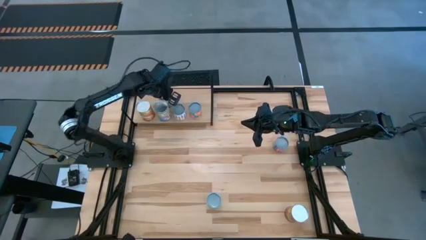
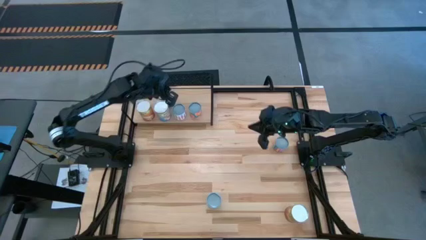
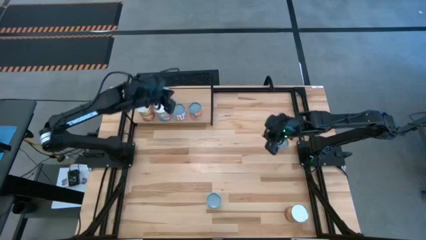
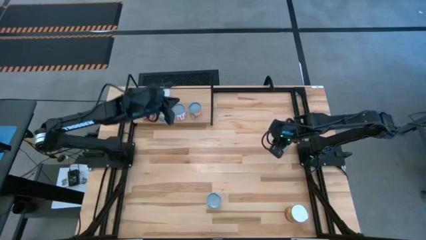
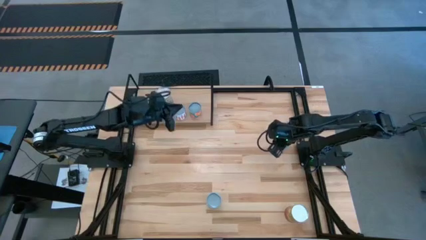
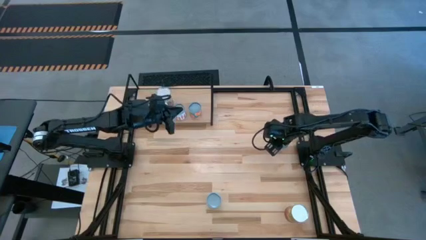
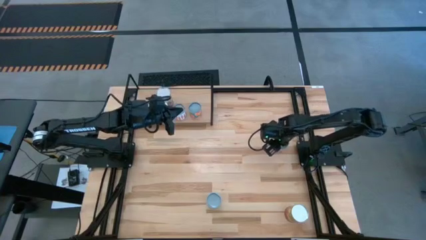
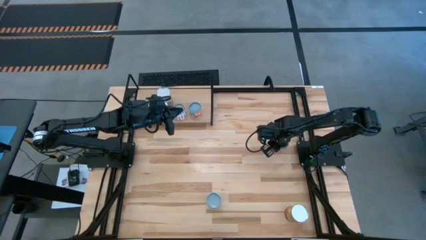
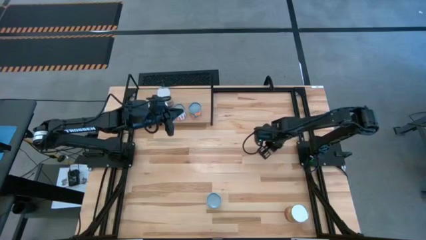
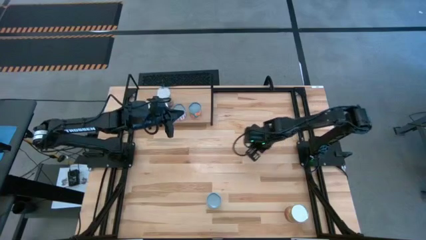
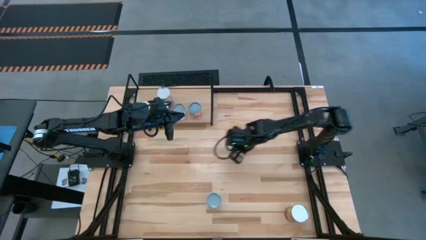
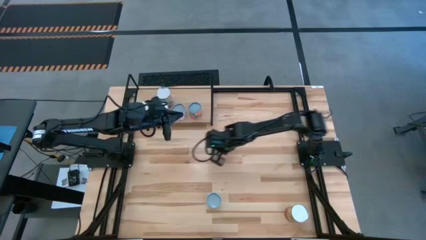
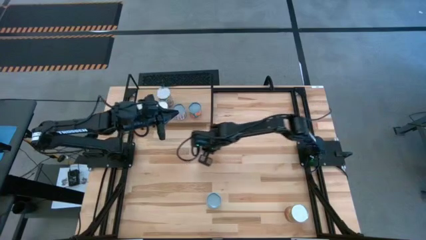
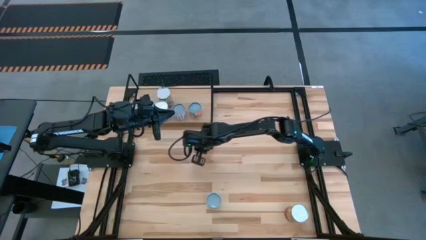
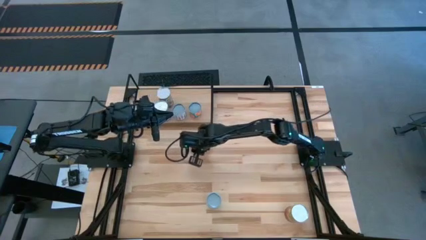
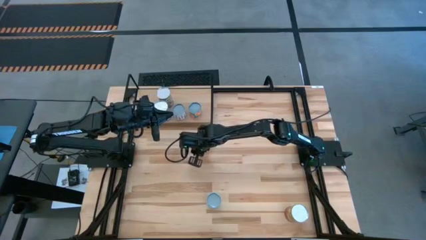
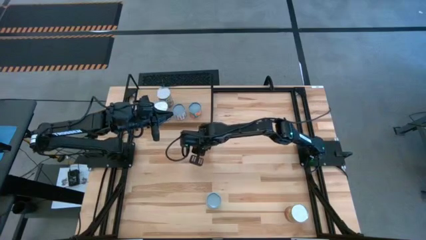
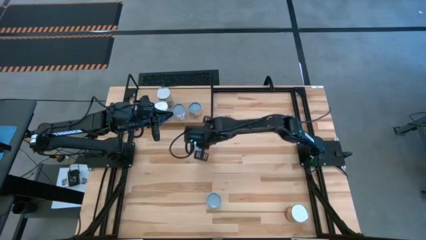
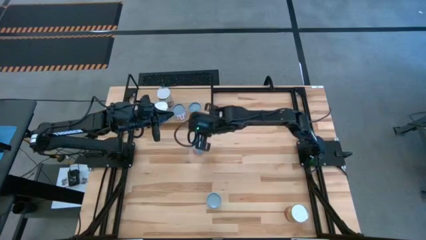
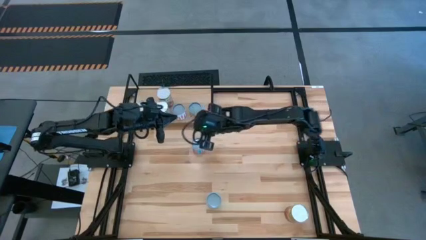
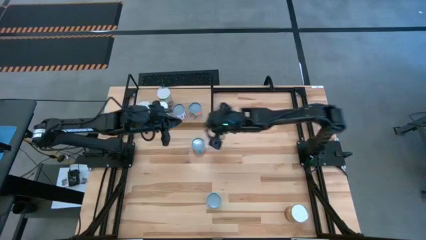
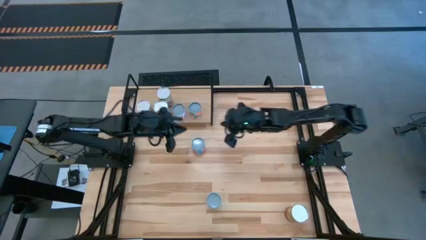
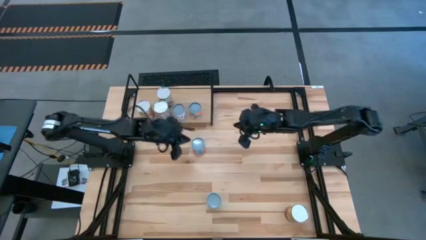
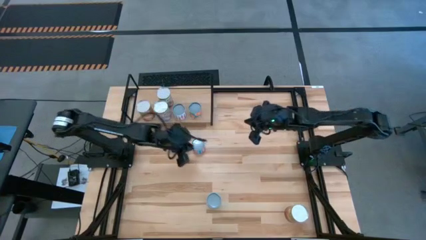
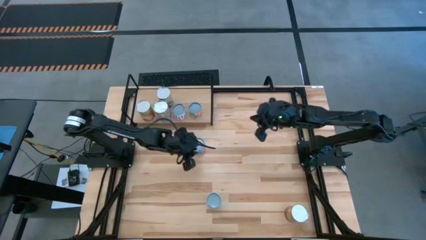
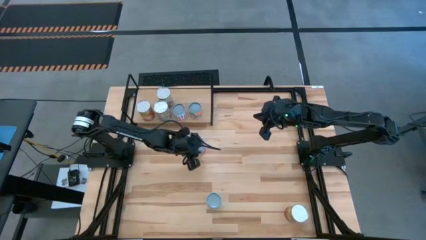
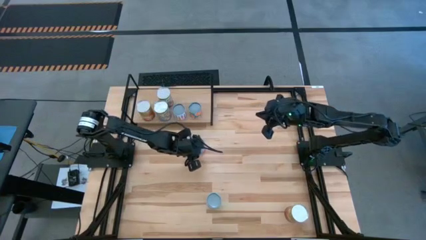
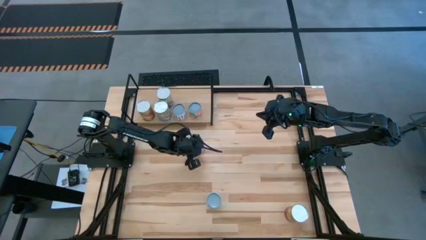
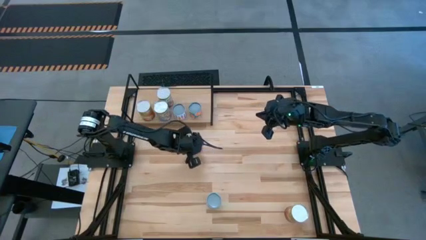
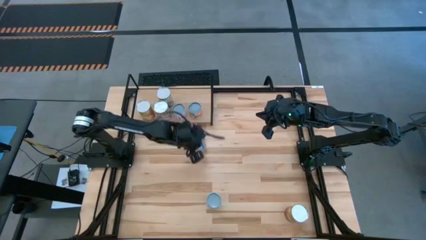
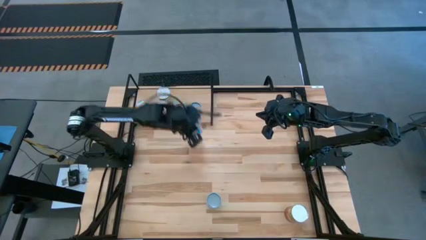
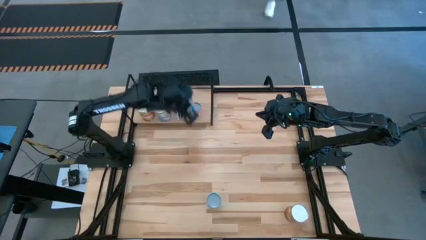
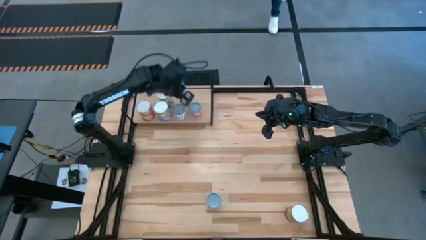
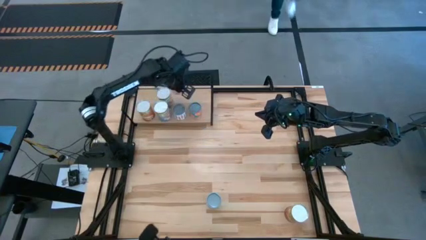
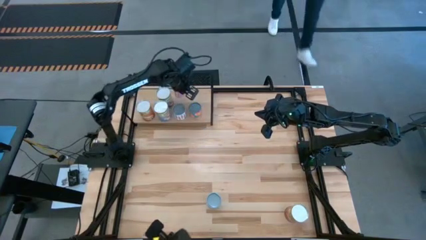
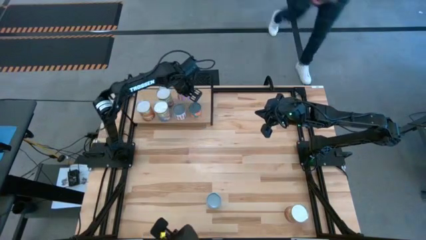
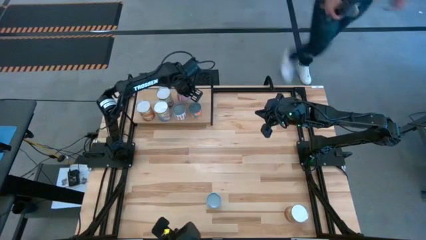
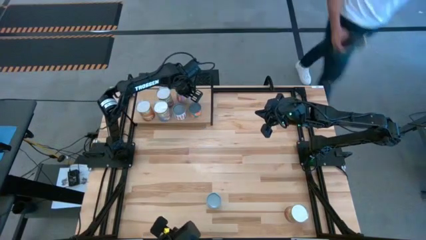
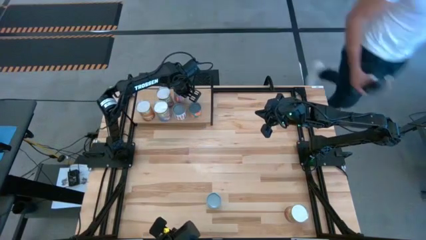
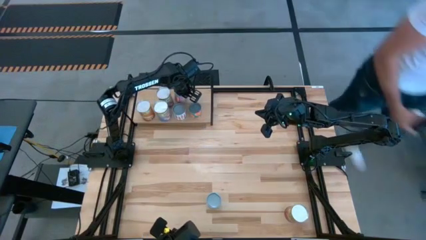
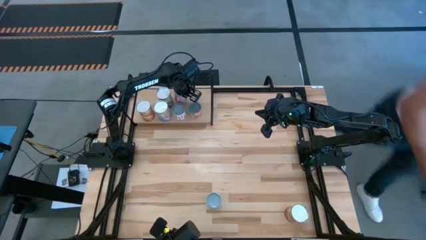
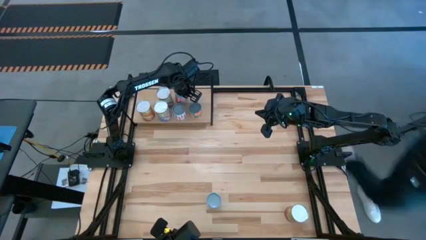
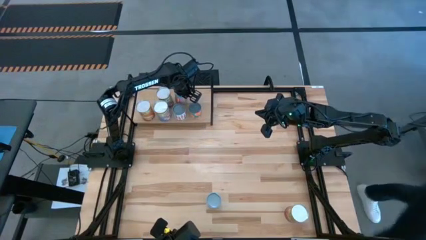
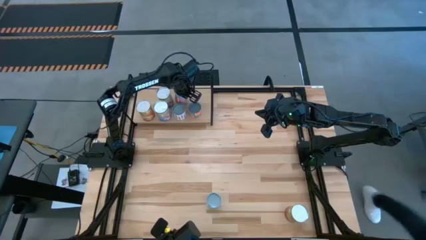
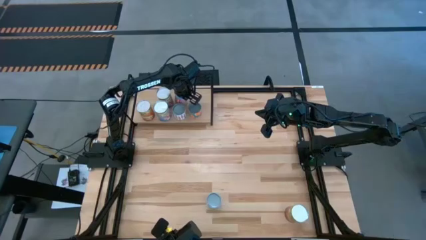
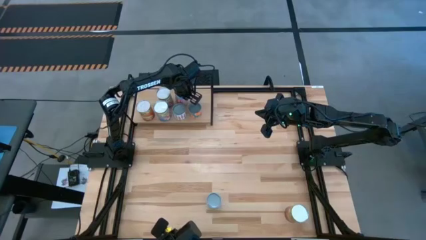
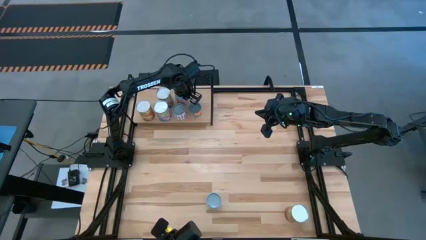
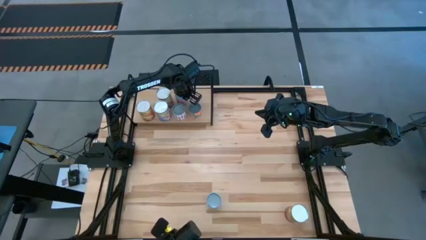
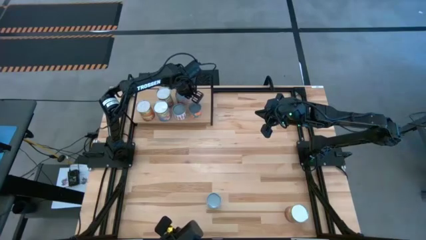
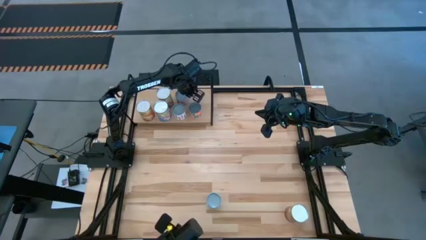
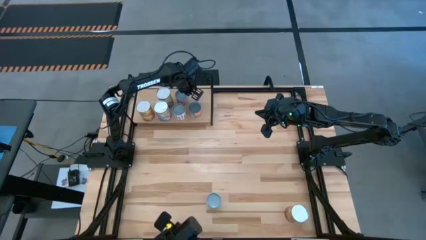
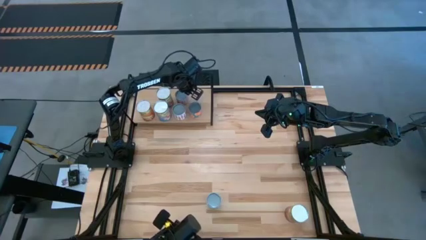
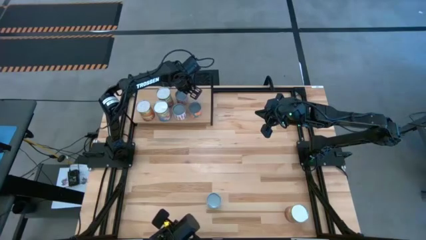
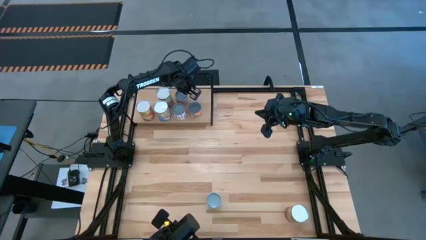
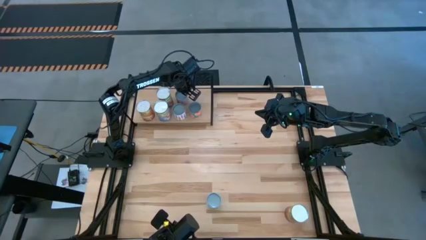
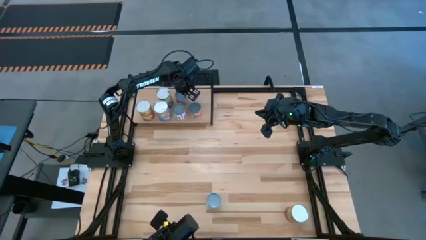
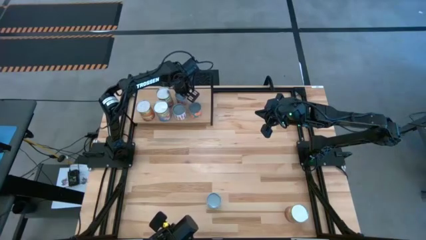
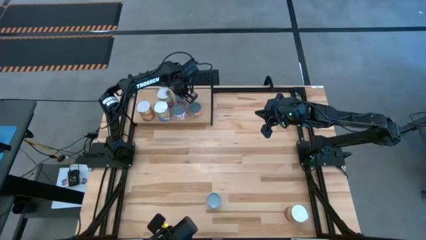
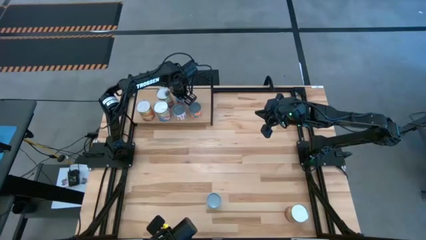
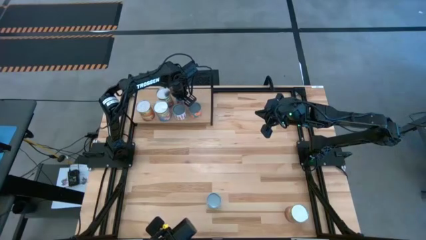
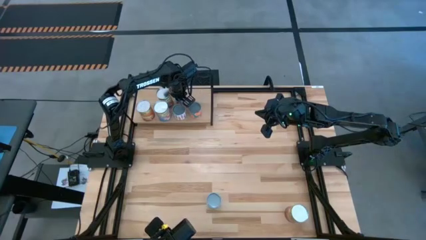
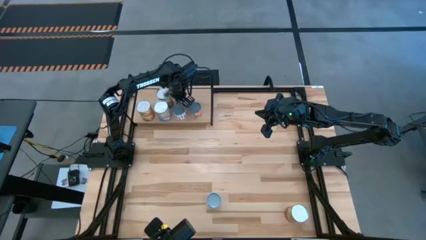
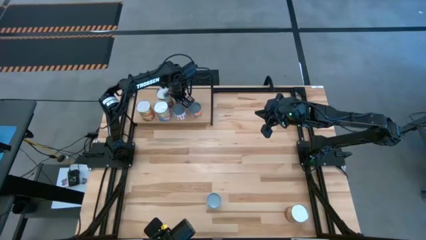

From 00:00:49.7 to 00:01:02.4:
Task: Pick and place cans onto a shelf
Put the small canned corn on the shelf

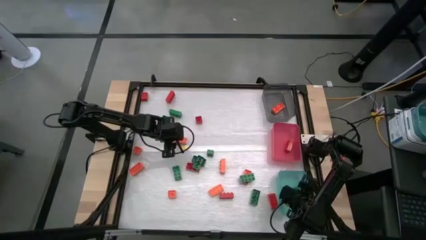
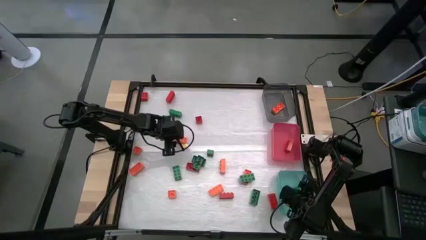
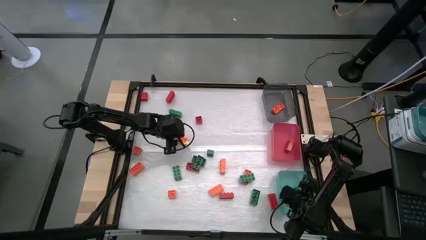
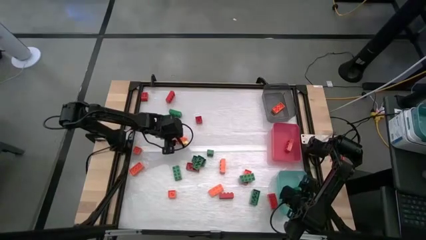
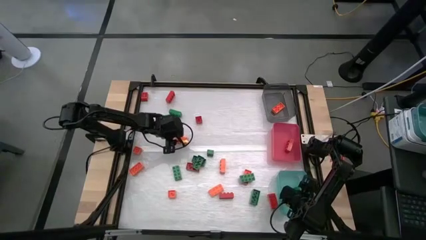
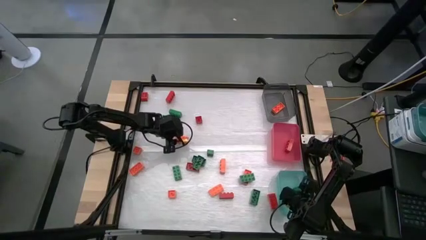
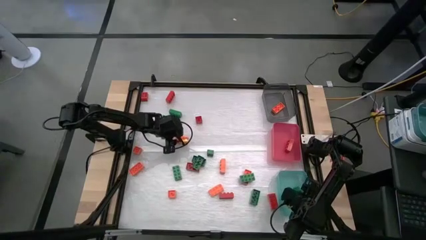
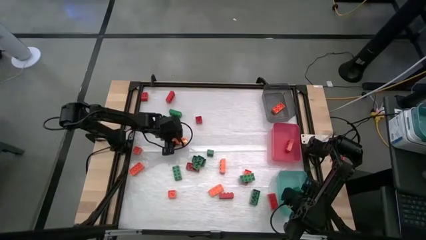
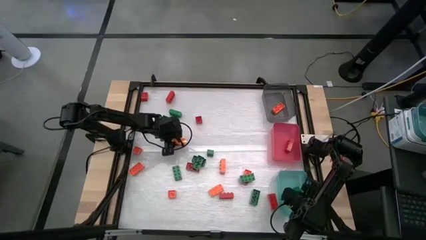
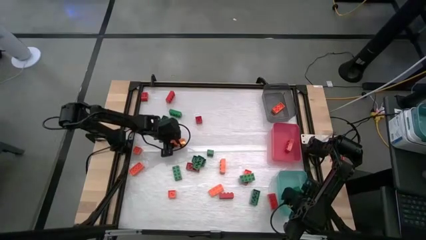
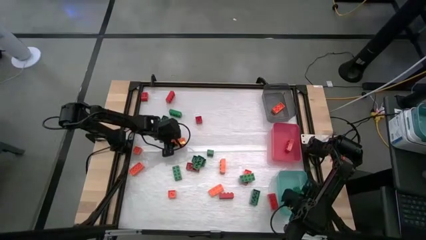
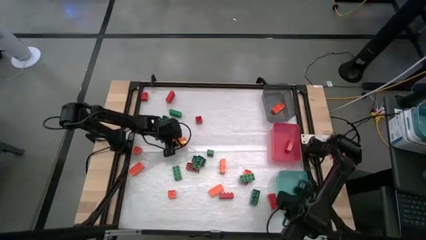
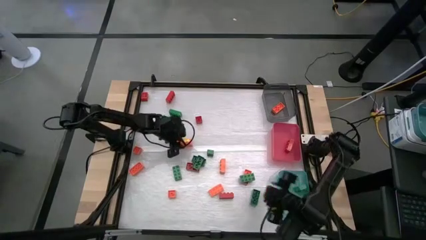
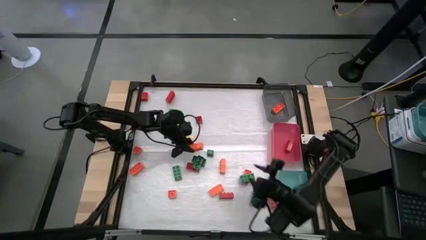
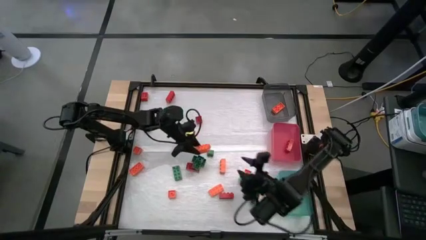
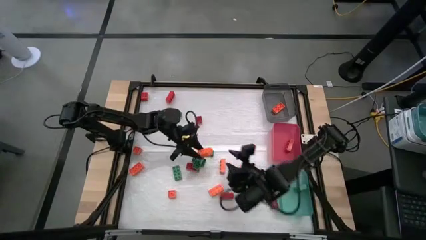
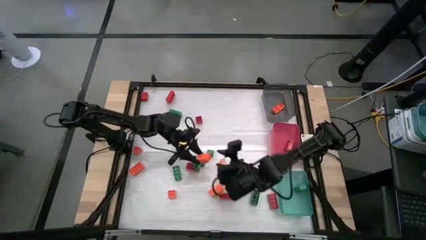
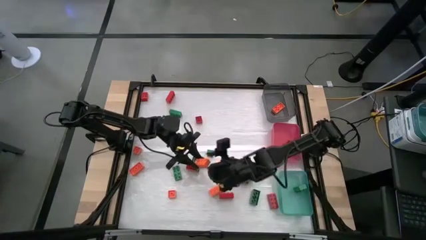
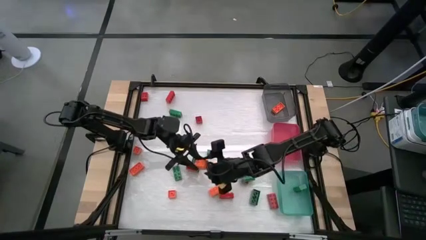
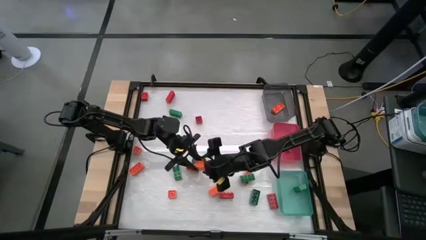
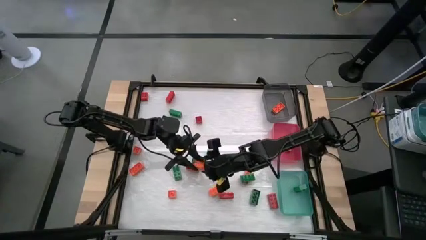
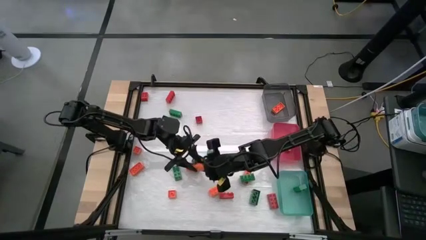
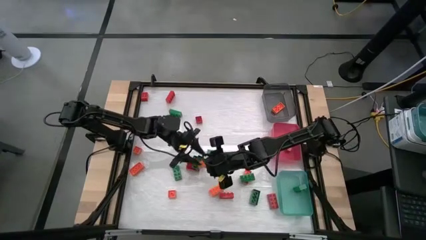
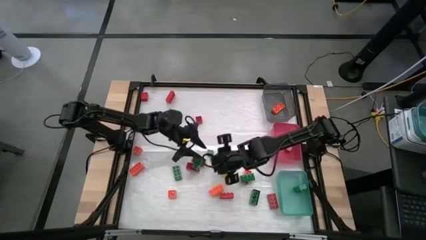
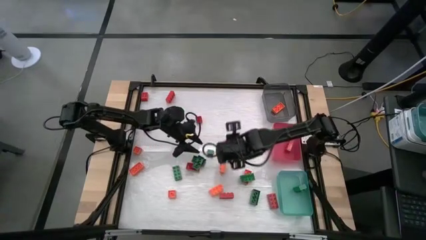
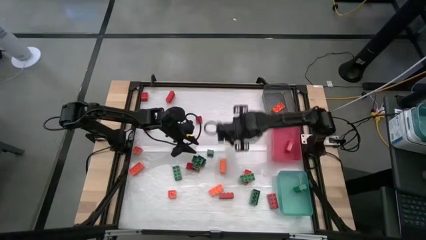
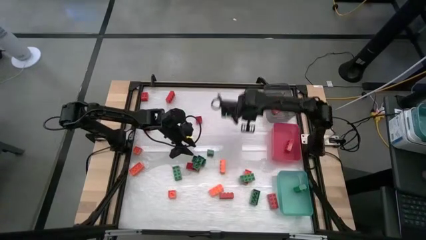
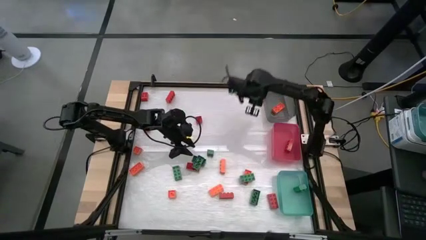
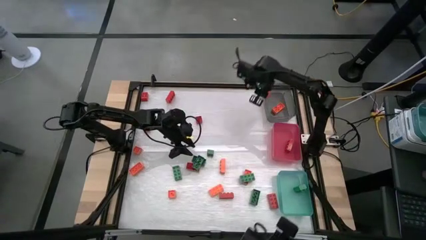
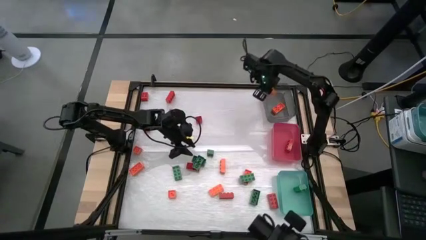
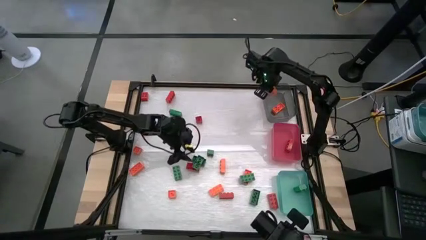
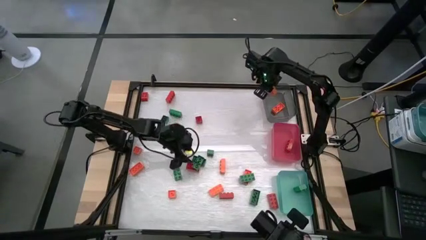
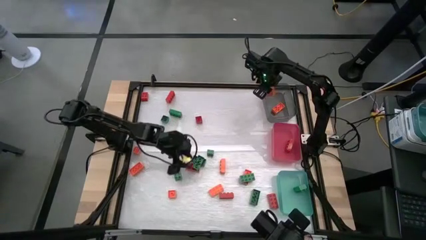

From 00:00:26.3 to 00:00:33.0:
Task: Sort blocks
Put the orange game piece into the black bin
